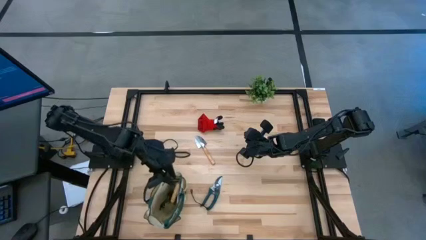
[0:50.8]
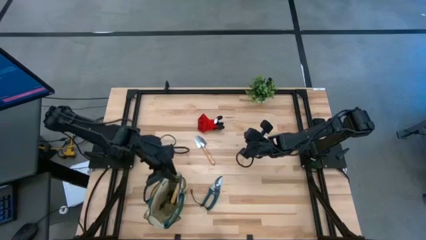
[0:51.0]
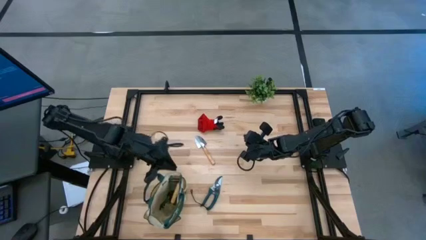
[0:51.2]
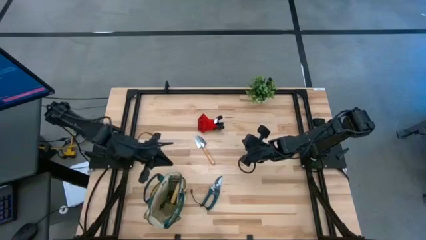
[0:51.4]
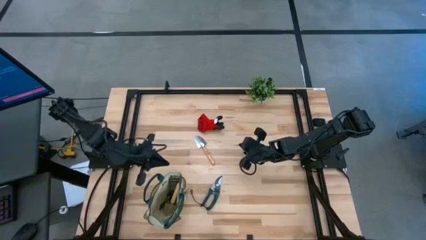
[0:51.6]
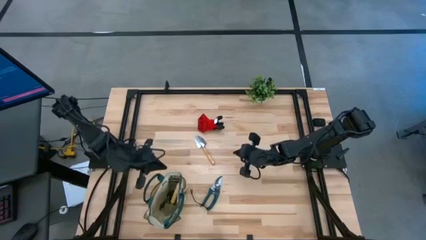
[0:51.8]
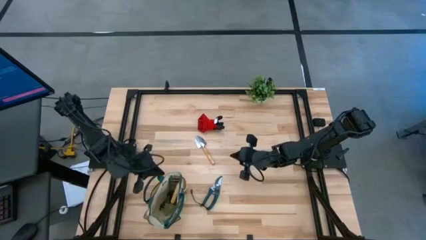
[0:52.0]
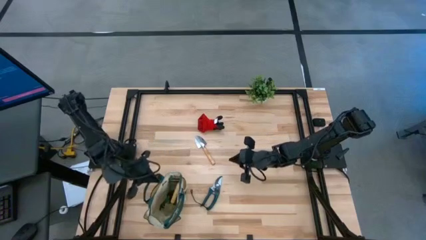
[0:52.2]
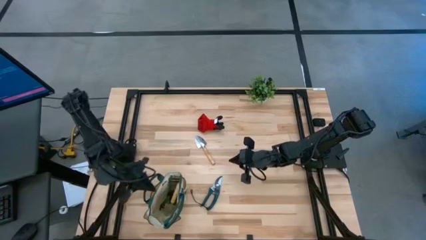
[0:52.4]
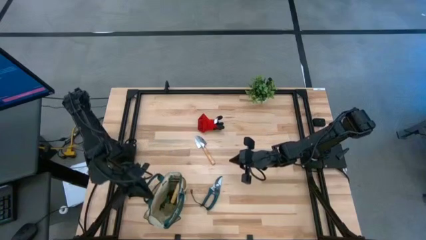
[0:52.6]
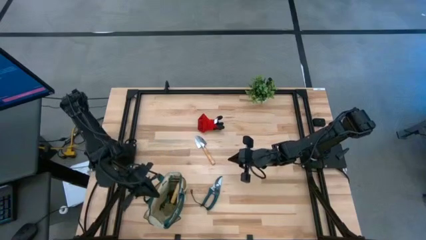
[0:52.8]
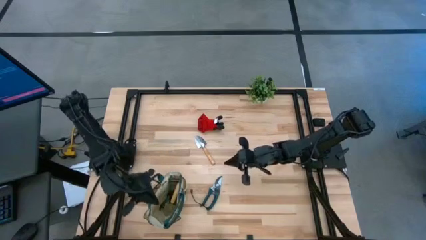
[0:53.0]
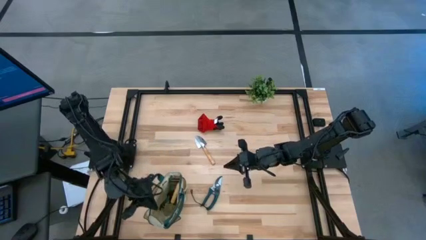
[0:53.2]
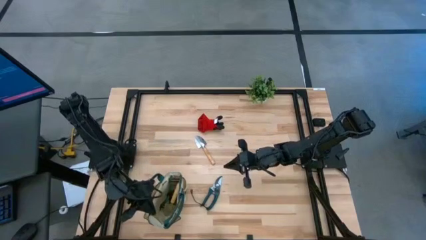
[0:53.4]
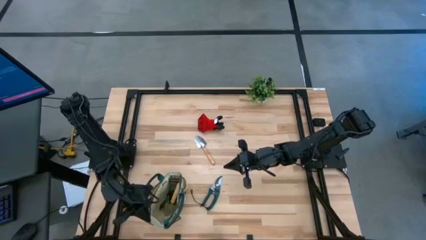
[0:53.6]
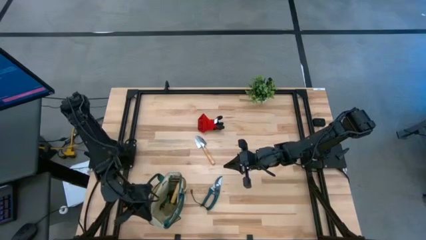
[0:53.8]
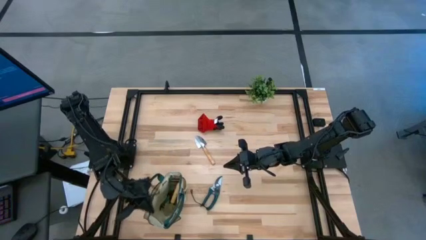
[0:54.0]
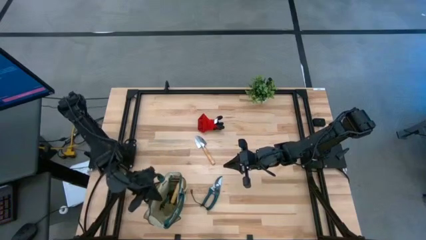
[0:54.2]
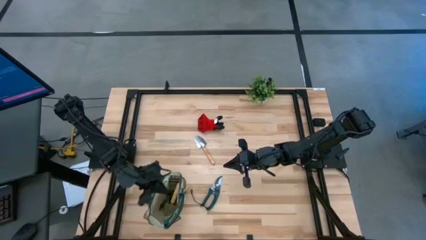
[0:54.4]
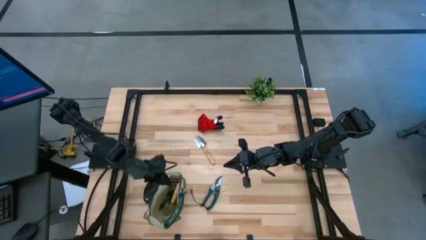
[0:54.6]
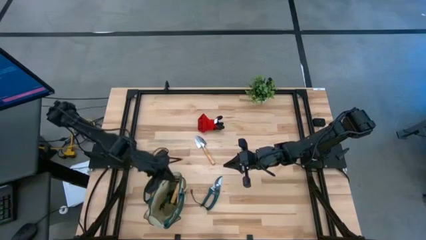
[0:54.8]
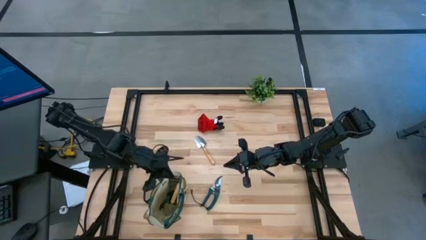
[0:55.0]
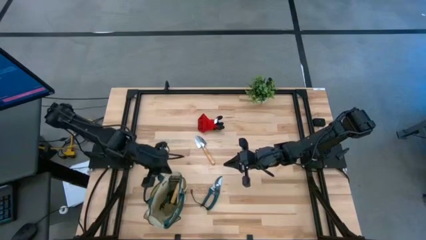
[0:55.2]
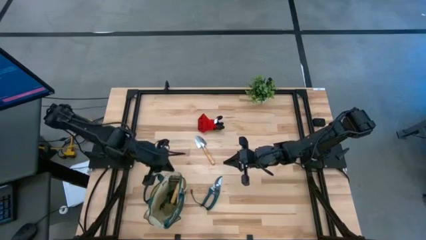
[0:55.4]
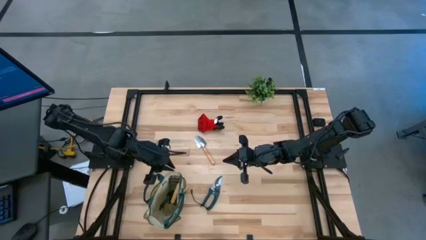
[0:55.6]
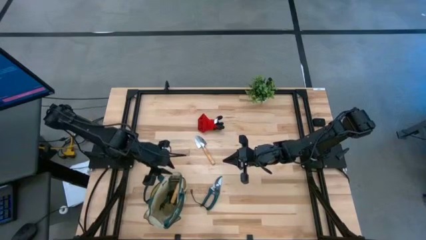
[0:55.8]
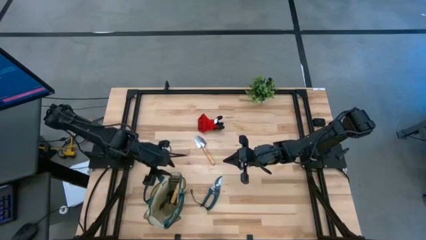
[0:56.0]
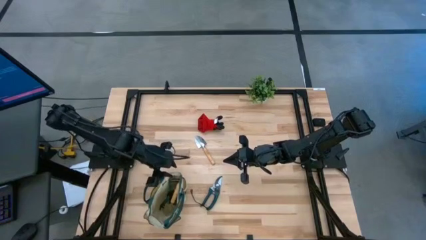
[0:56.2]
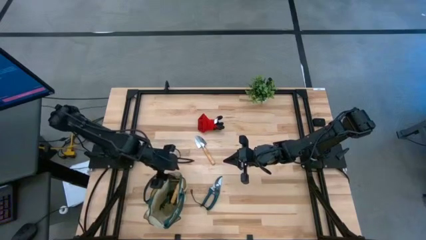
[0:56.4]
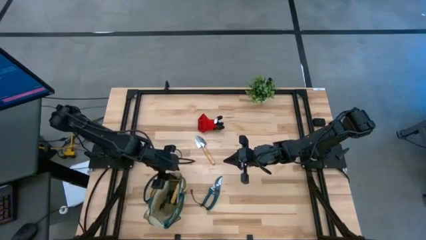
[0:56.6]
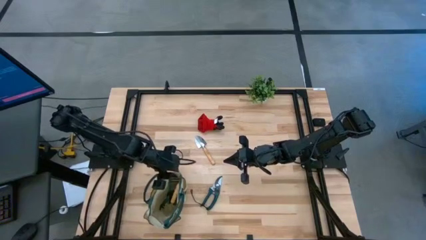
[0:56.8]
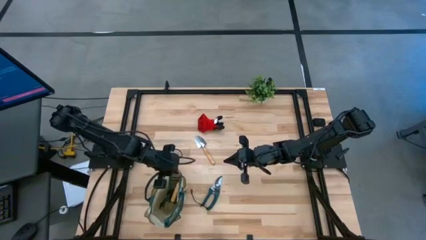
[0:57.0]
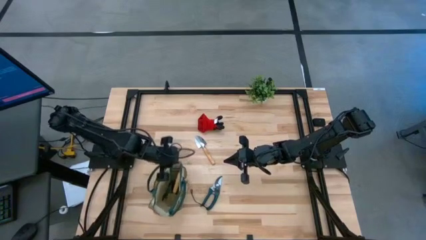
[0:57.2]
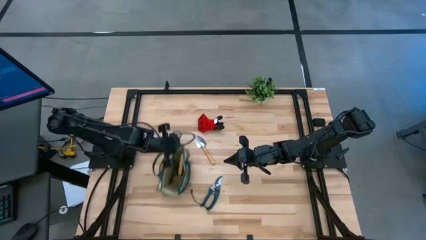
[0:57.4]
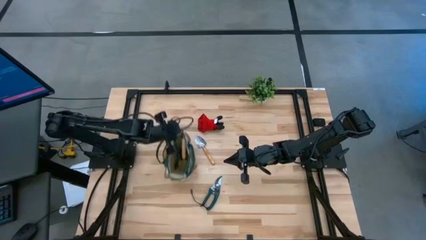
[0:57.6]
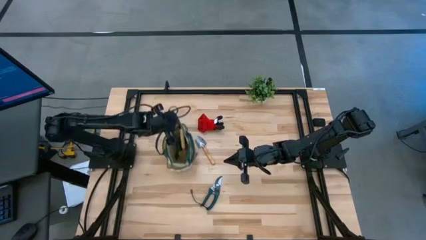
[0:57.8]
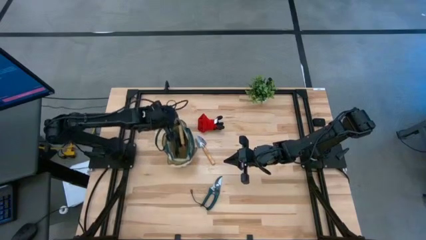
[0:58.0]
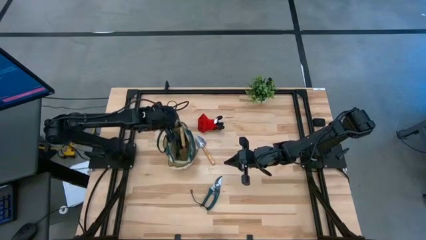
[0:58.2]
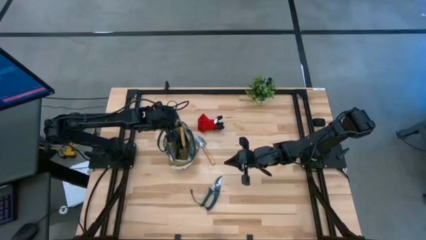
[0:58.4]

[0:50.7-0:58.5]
Task: Pick & Place Garden tools in Gardening bag
Move the green gardening bag to the middle left of the table

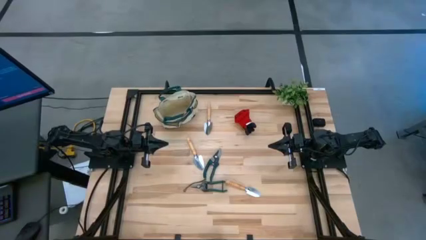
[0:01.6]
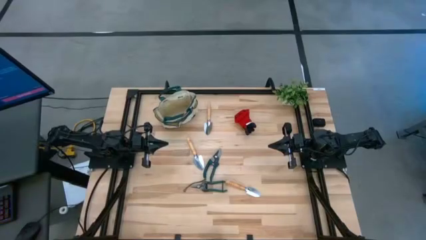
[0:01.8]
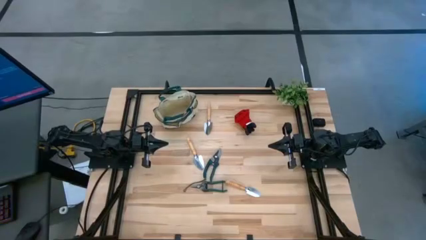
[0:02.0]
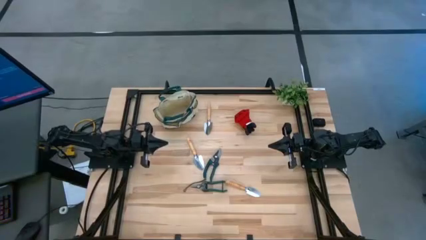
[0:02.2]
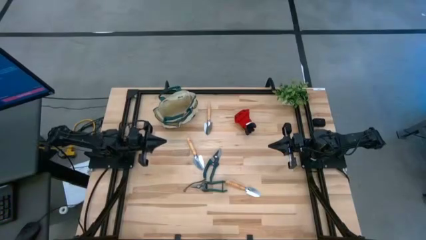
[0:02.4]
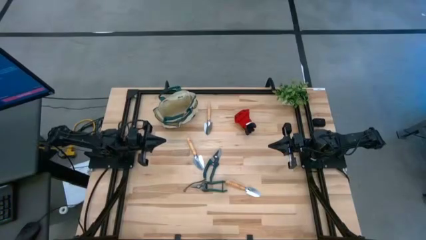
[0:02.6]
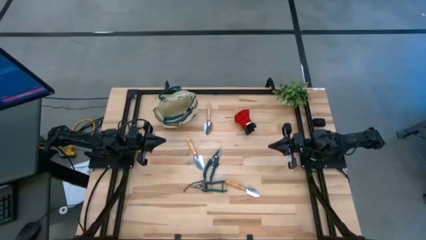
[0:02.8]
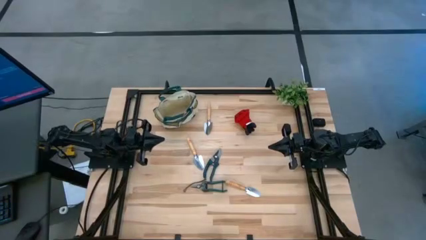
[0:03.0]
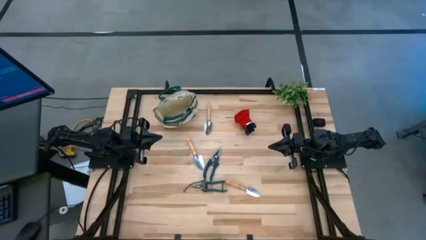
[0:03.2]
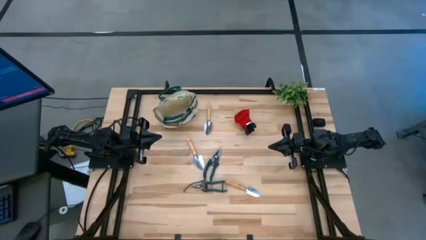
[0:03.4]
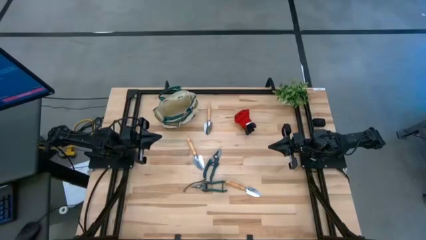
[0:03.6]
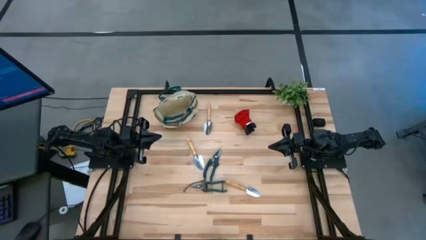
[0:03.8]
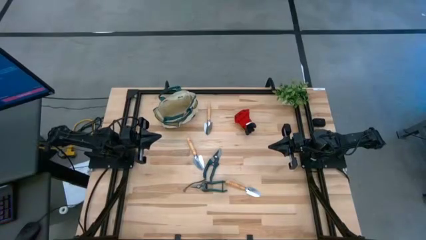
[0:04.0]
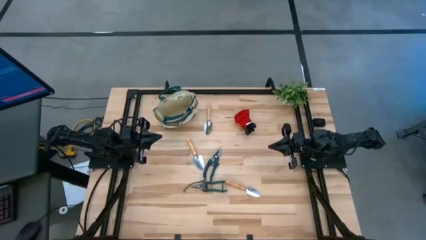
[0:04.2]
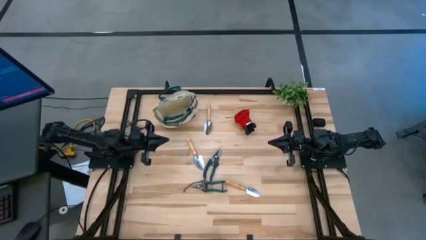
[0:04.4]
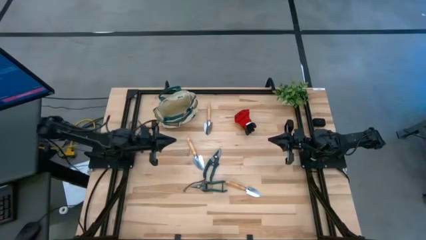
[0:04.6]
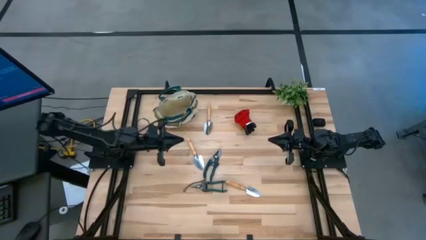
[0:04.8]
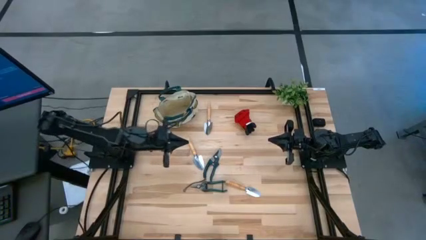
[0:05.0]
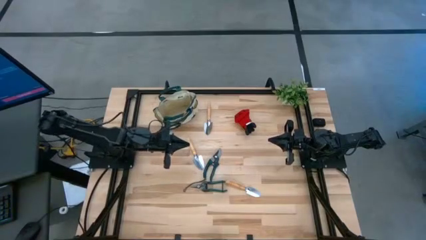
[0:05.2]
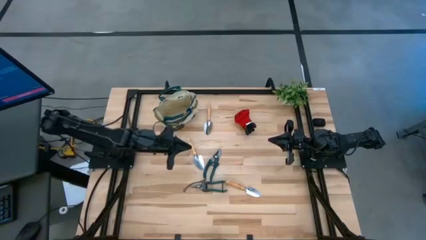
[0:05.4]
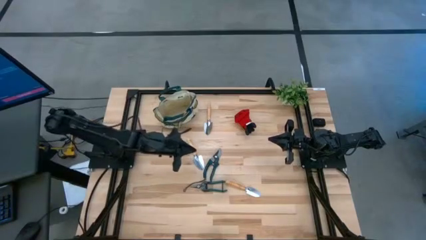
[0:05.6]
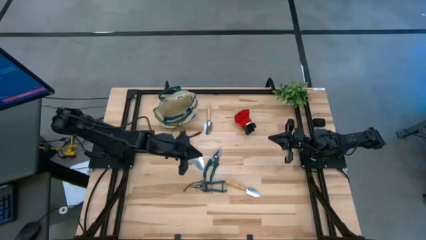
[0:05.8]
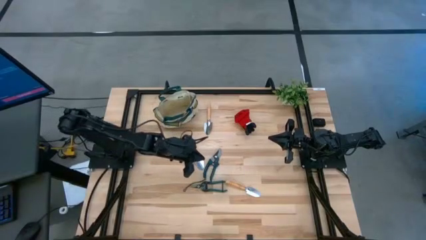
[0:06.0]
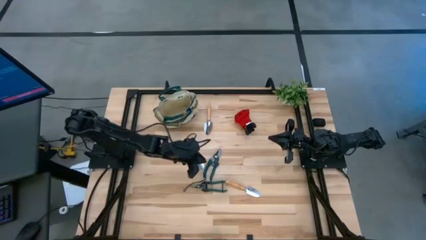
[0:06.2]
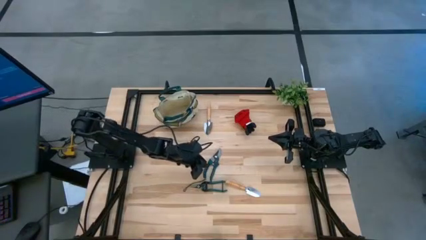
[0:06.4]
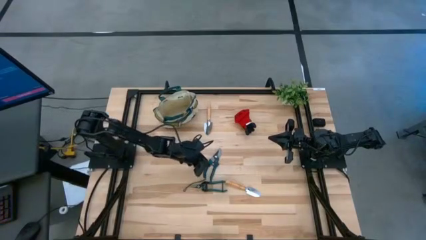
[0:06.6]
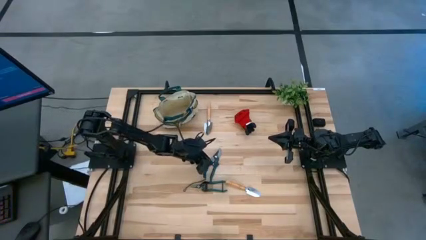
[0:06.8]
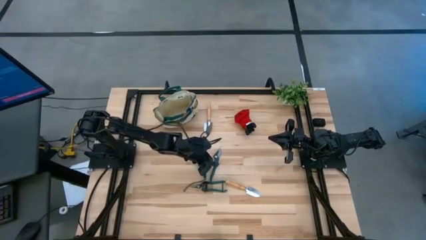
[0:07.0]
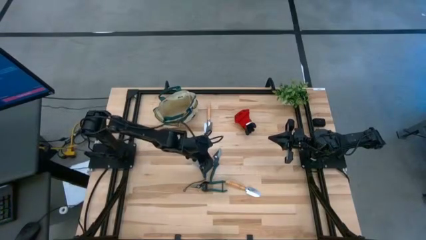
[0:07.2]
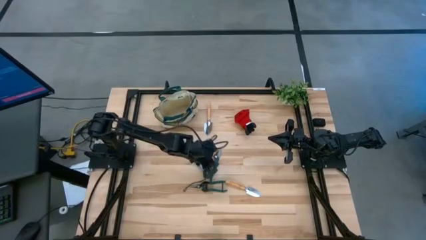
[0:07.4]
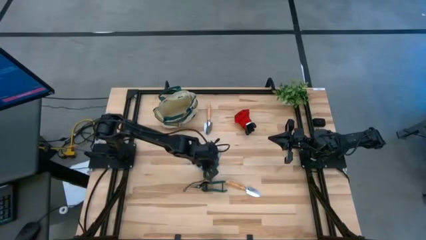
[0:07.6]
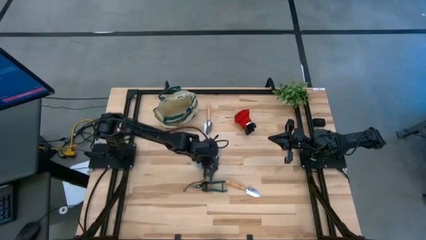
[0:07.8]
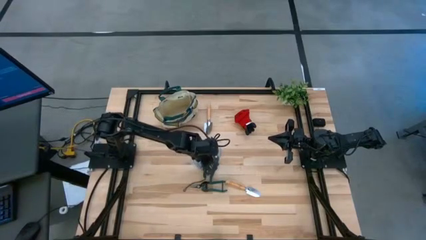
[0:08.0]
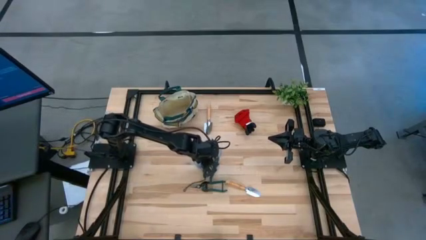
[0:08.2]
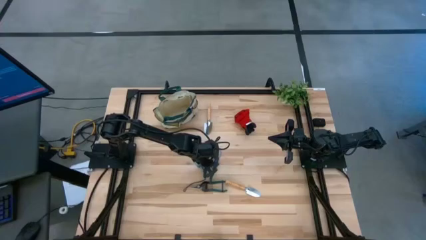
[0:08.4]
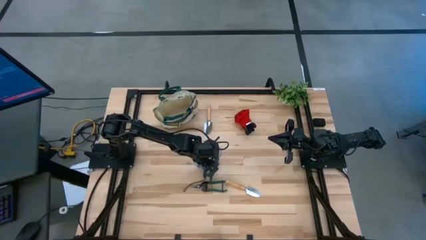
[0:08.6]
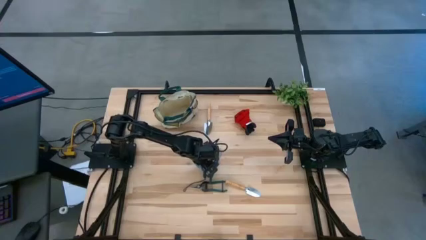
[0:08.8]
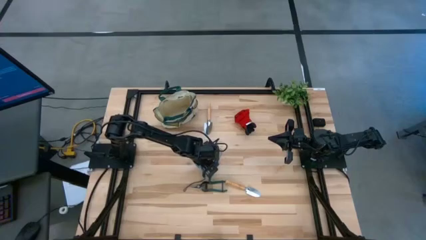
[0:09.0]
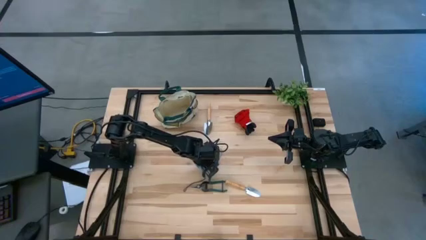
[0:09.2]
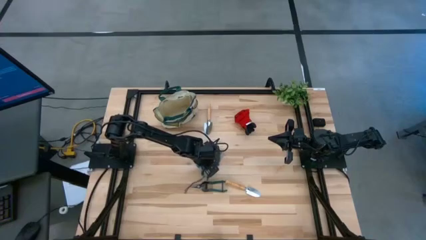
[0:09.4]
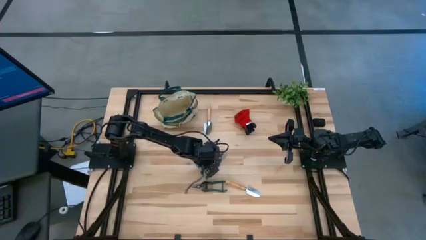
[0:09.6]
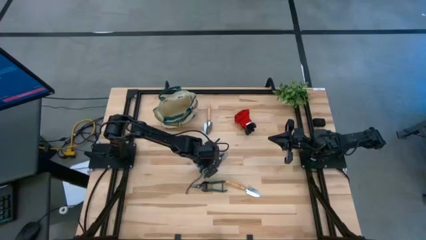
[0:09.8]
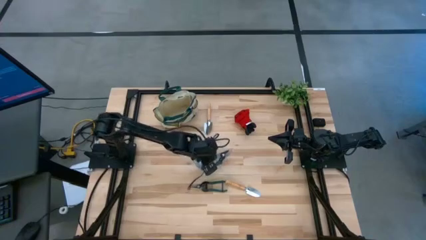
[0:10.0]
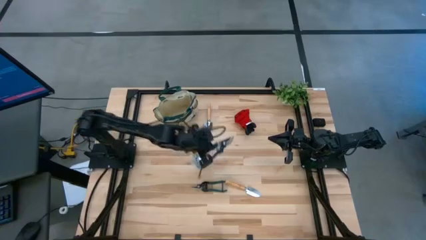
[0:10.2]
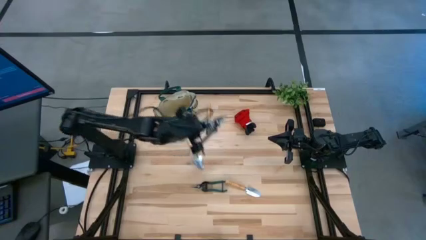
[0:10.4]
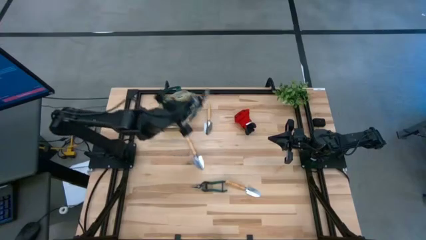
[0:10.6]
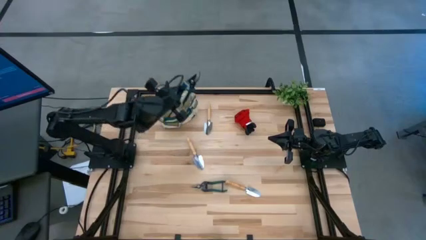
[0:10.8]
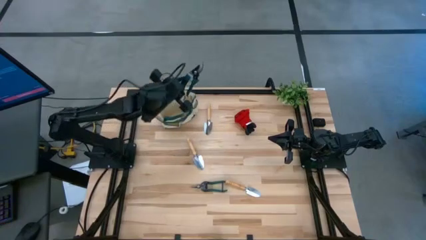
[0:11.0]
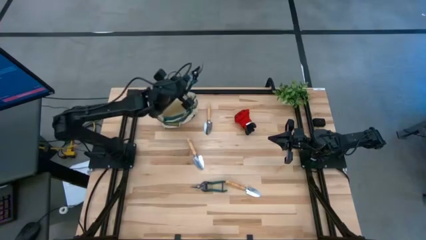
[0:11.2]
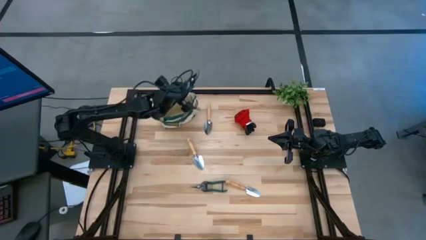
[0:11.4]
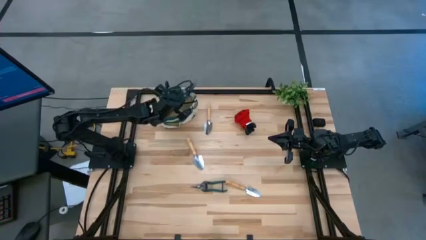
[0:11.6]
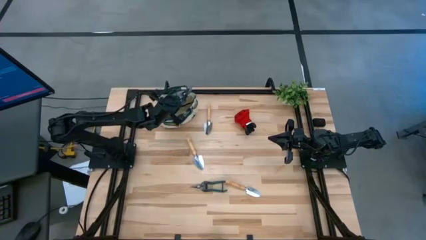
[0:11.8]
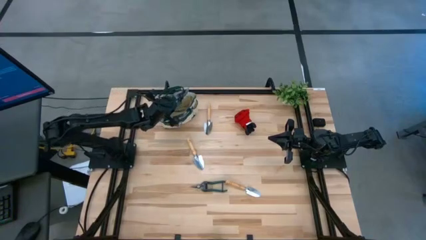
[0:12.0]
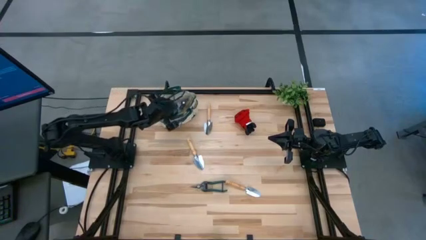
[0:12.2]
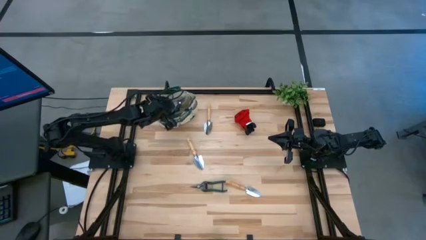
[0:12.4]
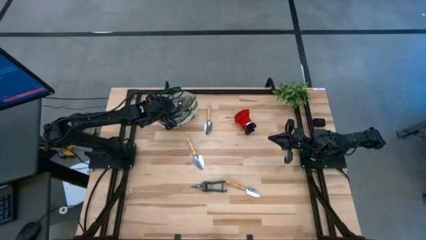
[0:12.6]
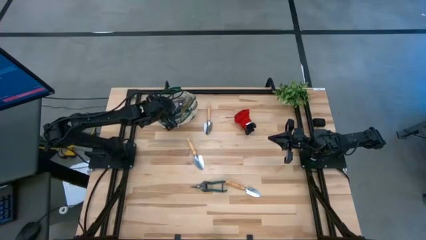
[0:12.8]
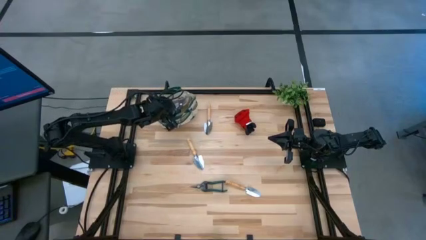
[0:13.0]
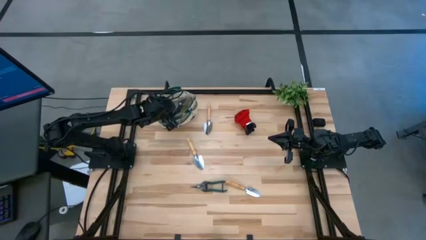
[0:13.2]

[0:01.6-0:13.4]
Task: Pick & Place Garden tools in Gardening bag
Put the green shear scissors into the yellow gardening bag
